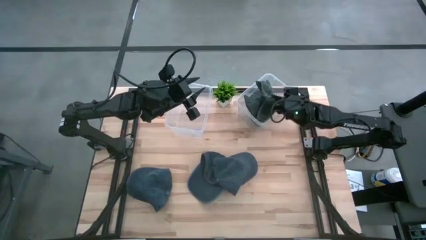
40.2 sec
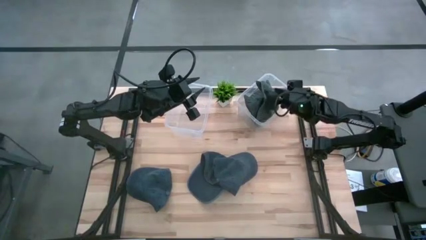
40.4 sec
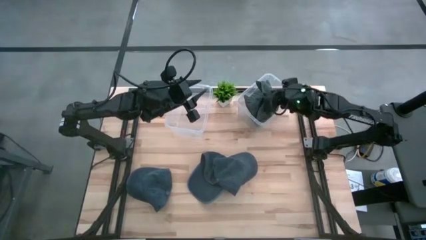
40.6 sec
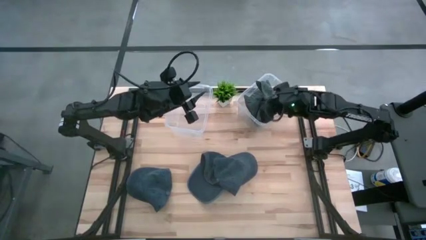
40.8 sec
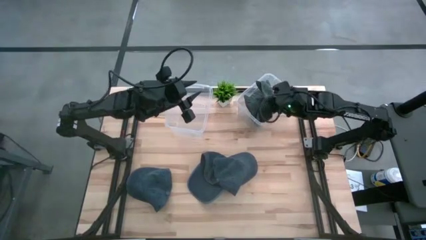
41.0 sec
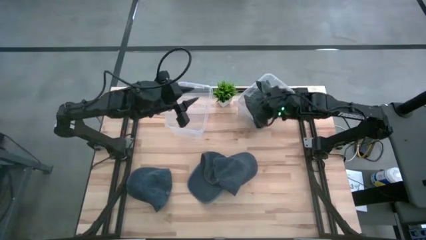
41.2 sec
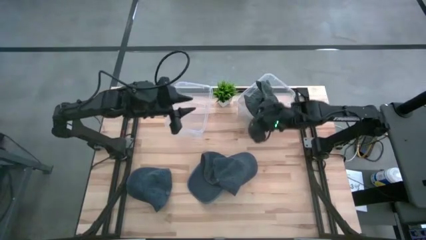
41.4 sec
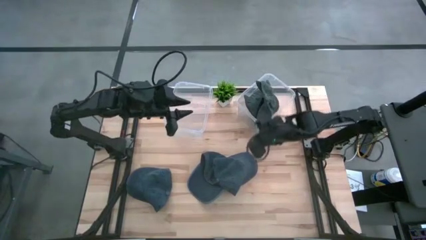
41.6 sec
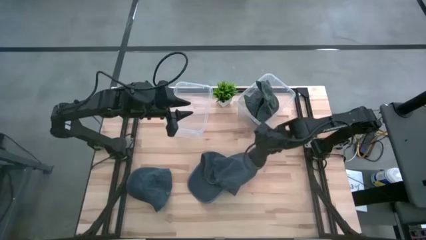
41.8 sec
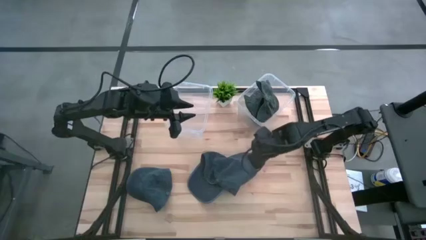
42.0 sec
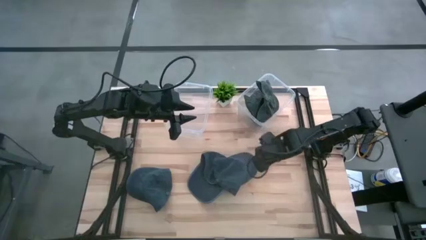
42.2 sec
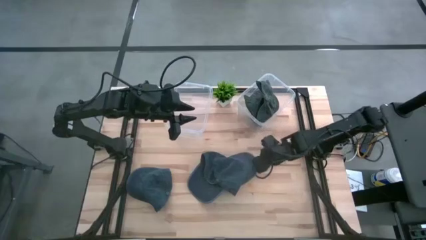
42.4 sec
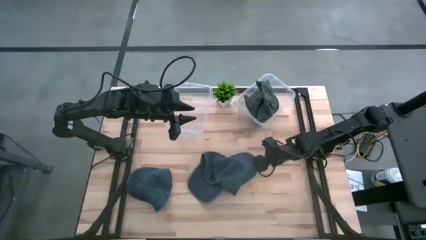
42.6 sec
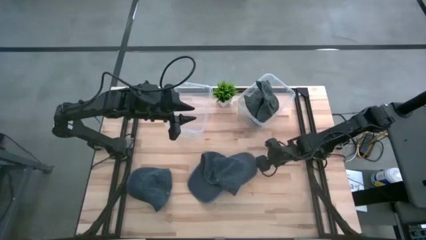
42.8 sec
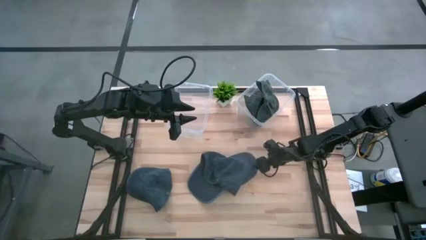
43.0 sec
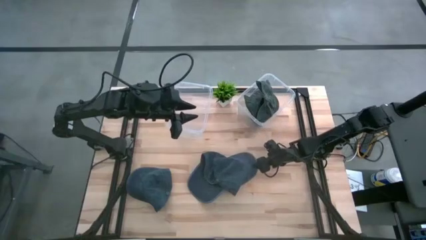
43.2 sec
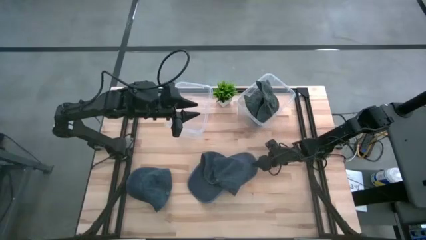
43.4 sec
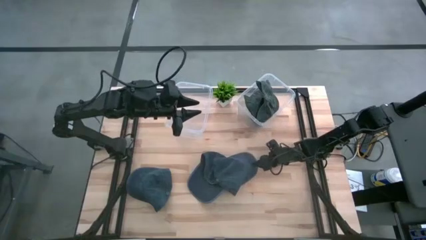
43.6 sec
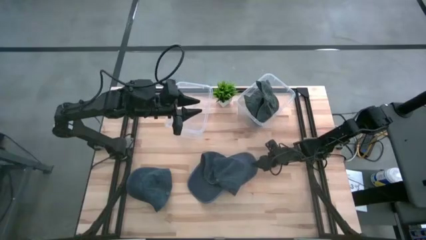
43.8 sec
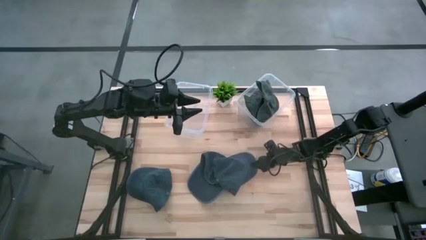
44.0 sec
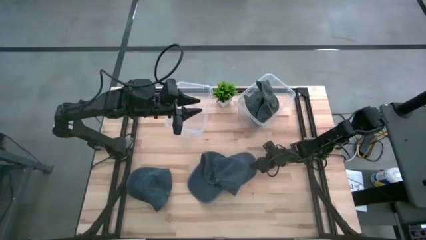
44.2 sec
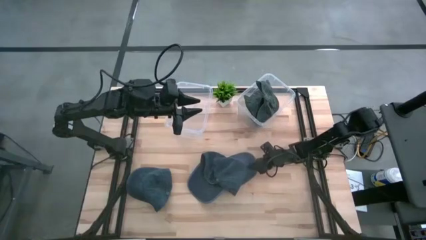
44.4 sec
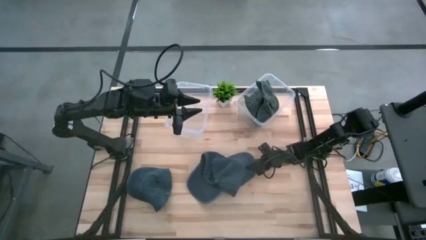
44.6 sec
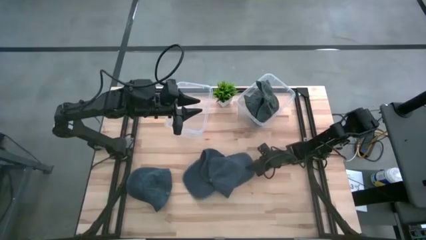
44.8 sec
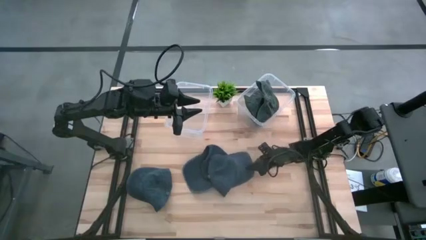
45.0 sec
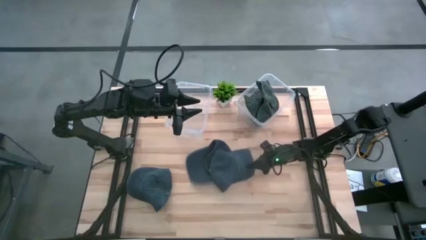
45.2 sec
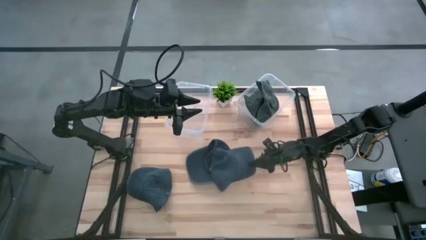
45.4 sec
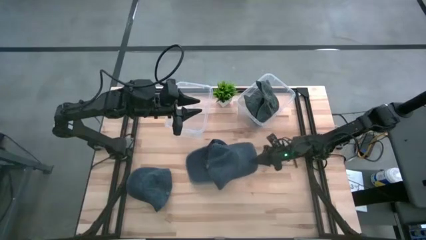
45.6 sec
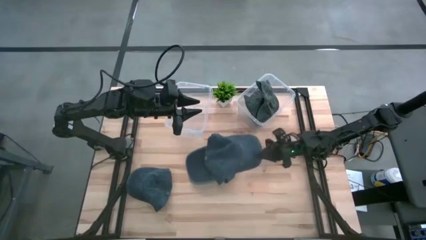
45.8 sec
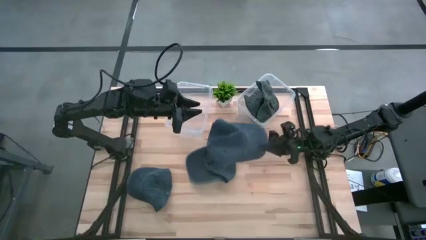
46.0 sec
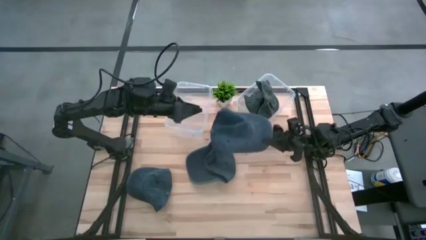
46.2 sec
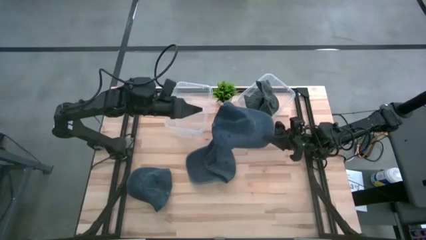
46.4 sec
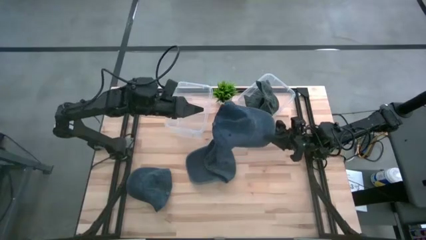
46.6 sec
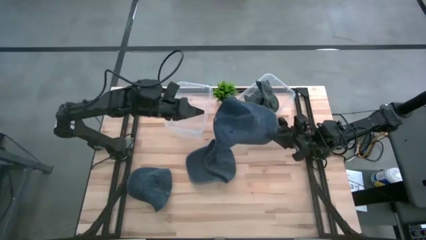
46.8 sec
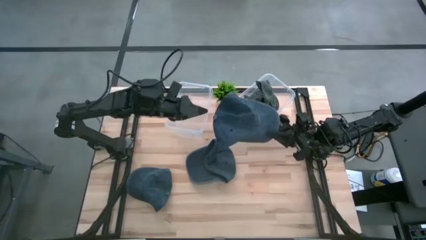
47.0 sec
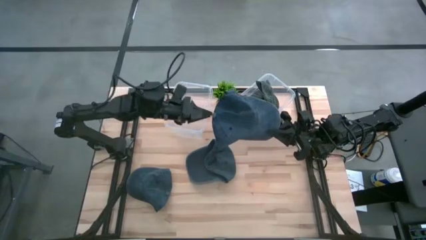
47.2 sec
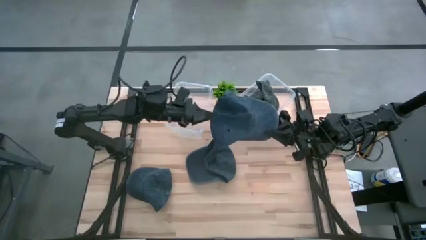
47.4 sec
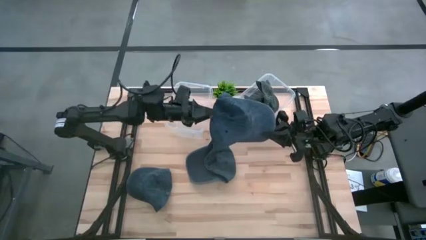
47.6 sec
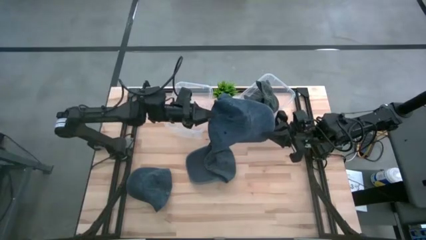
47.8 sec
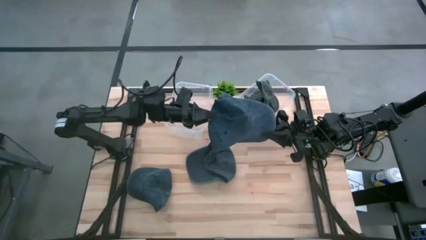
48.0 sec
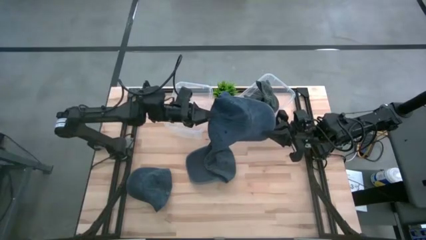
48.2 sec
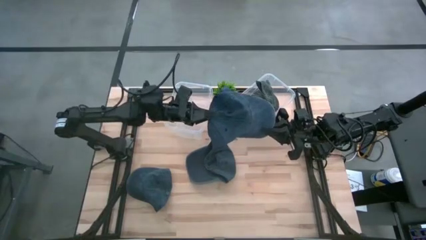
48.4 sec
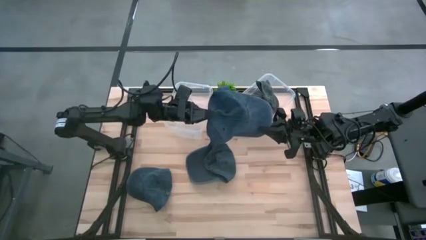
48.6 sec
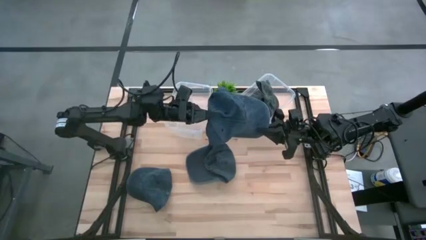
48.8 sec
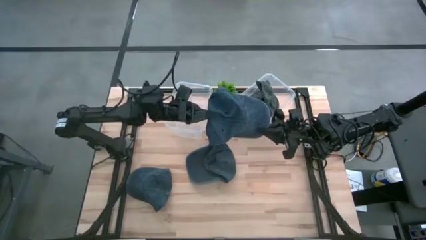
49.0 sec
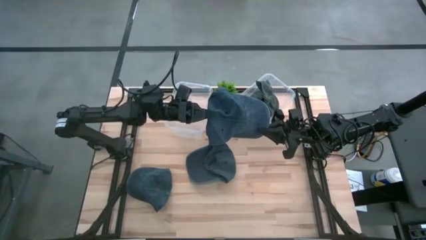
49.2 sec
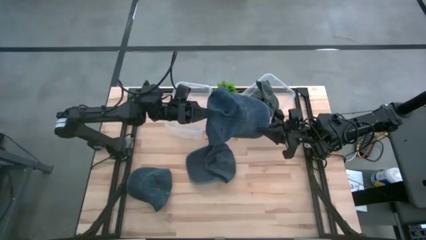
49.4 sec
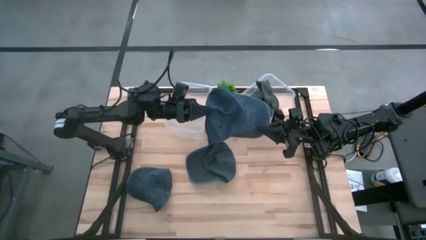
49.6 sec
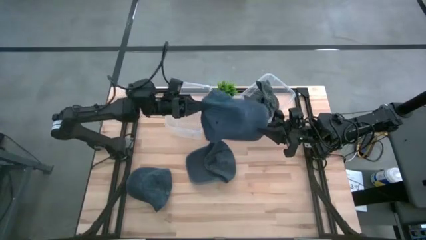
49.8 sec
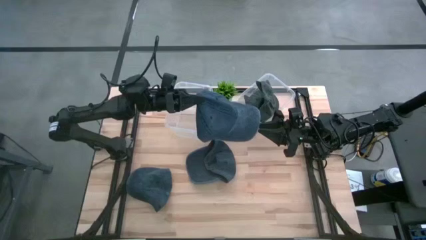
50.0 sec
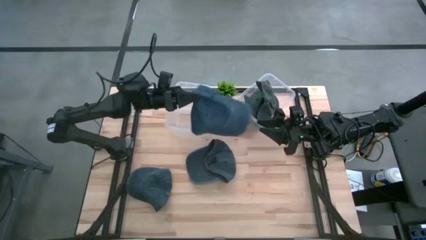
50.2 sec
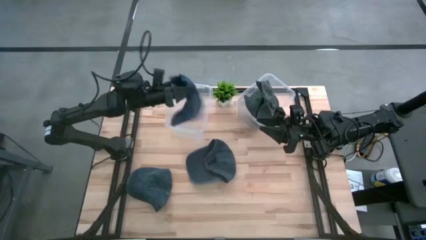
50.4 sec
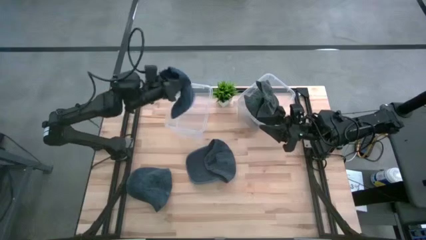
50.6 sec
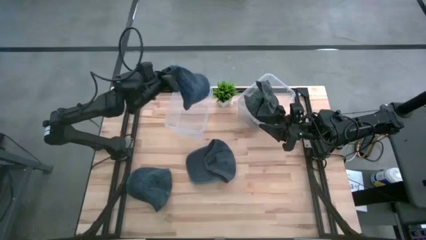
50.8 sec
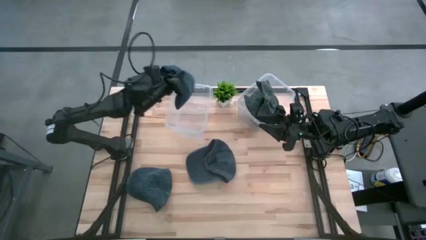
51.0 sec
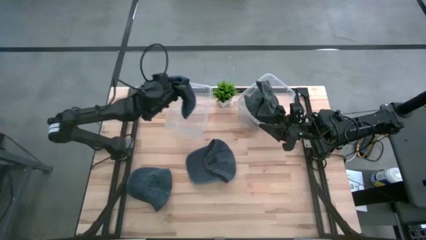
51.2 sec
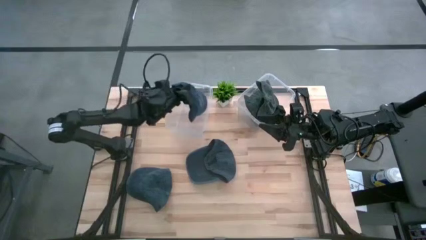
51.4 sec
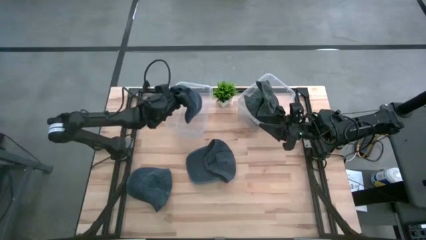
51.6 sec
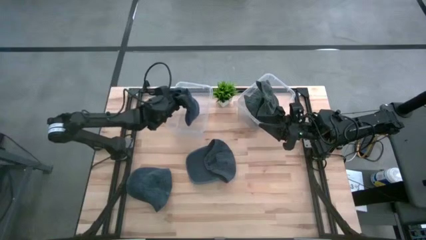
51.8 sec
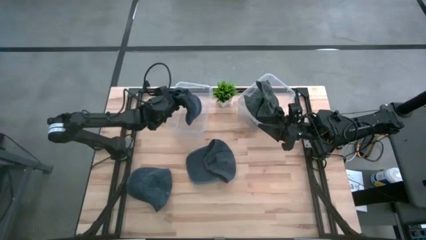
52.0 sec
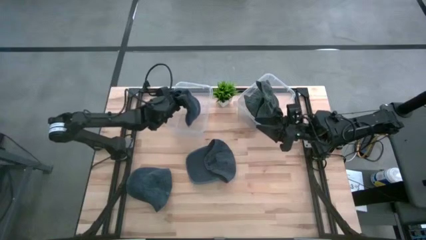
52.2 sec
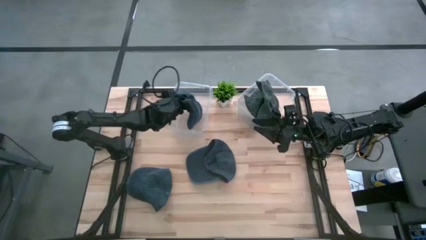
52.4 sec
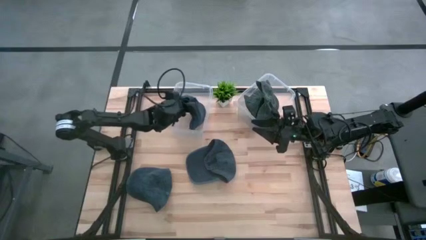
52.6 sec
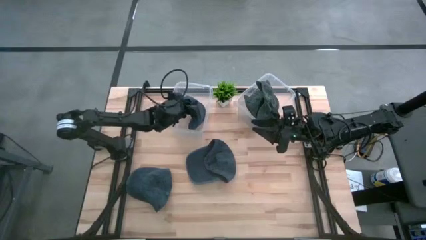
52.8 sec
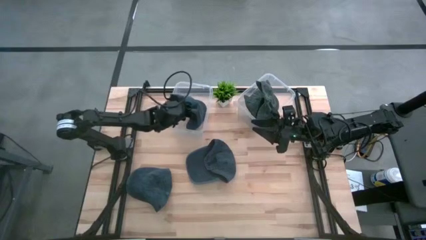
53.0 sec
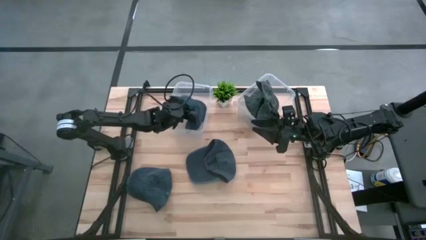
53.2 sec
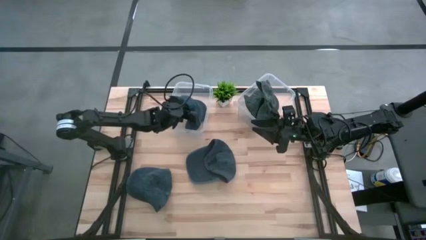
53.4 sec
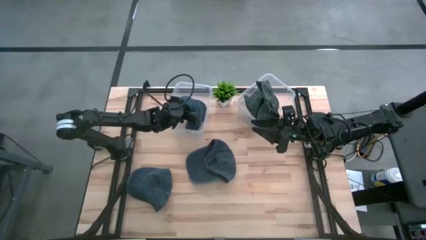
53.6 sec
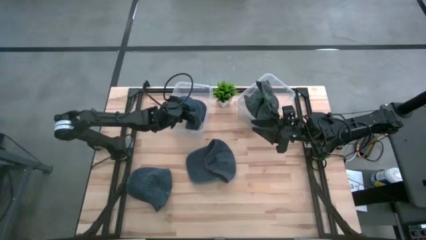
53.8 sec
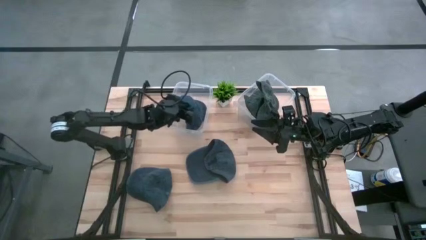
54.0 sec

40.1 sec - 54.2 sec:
Task: Pick & Place hat
Put the right blue cap in the left transparent bin
